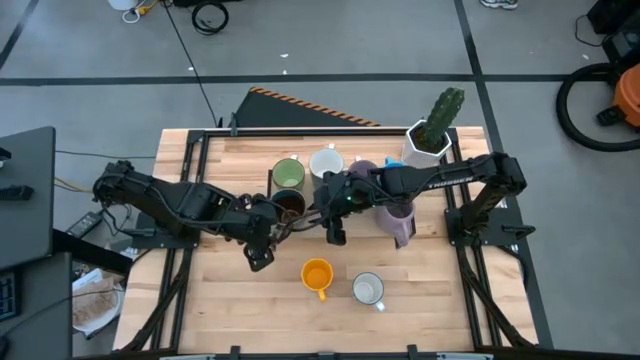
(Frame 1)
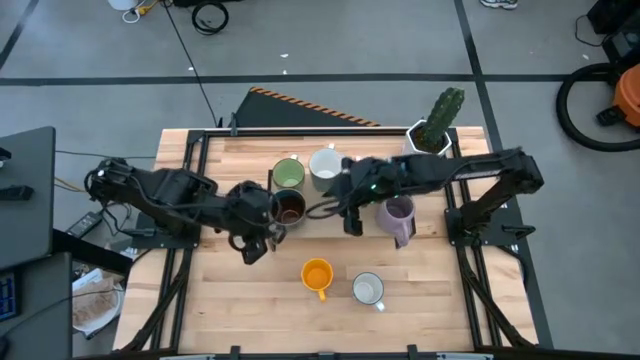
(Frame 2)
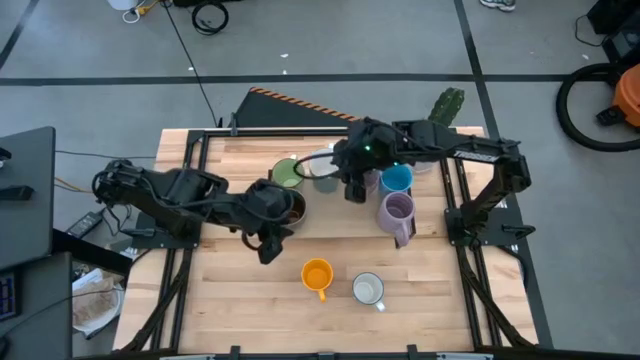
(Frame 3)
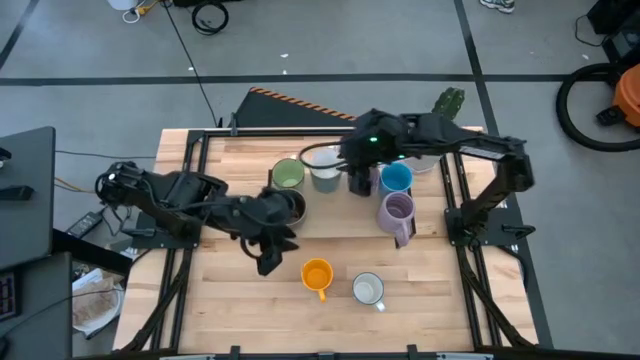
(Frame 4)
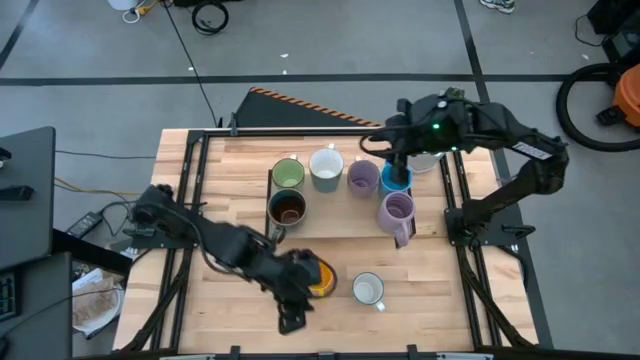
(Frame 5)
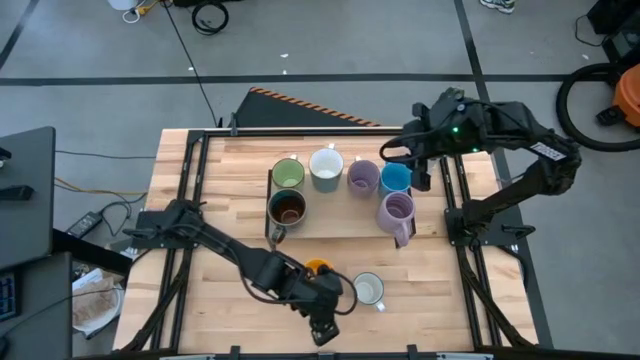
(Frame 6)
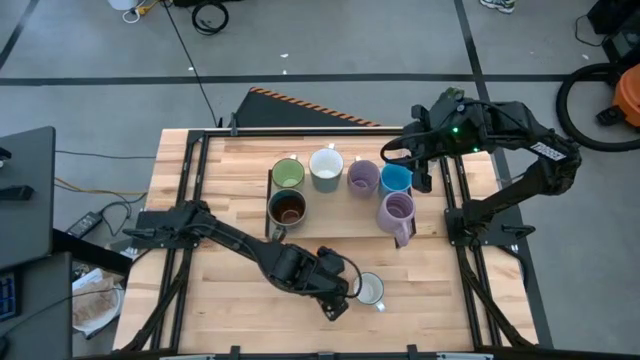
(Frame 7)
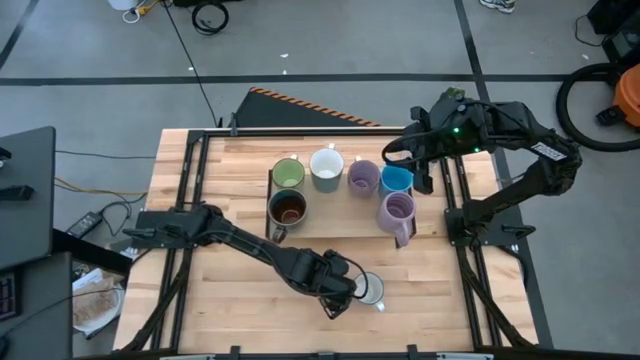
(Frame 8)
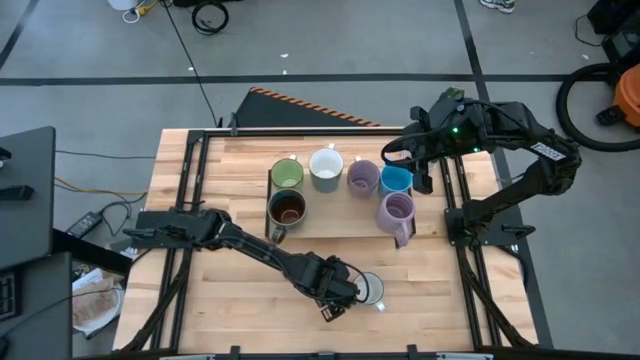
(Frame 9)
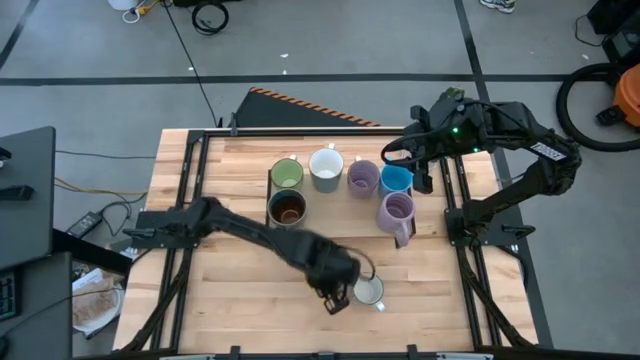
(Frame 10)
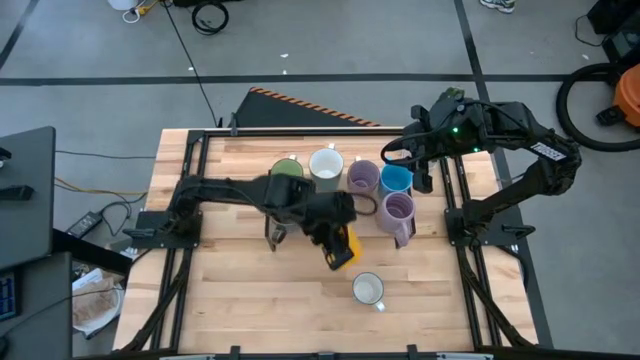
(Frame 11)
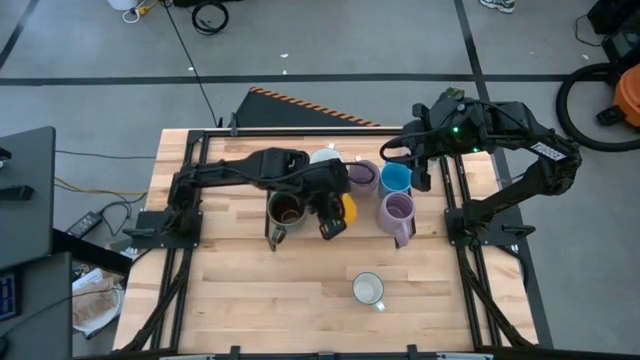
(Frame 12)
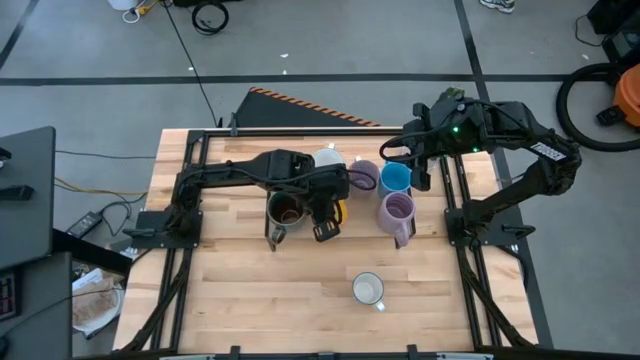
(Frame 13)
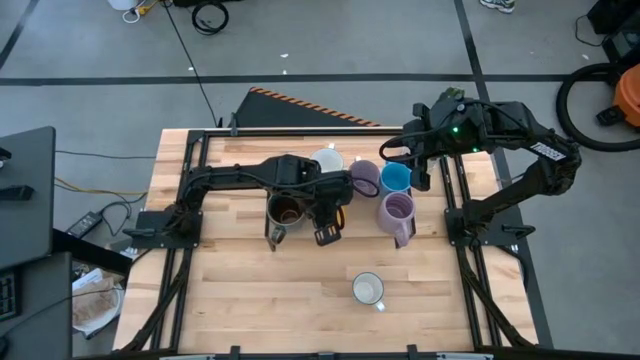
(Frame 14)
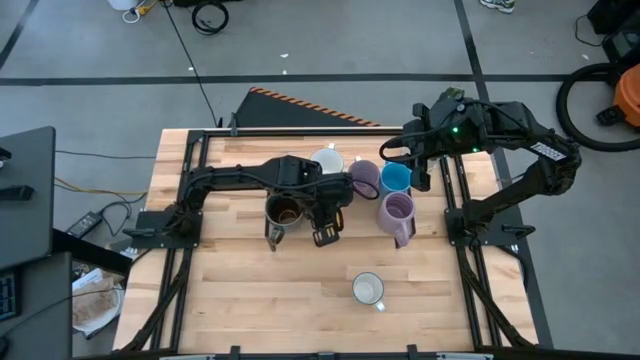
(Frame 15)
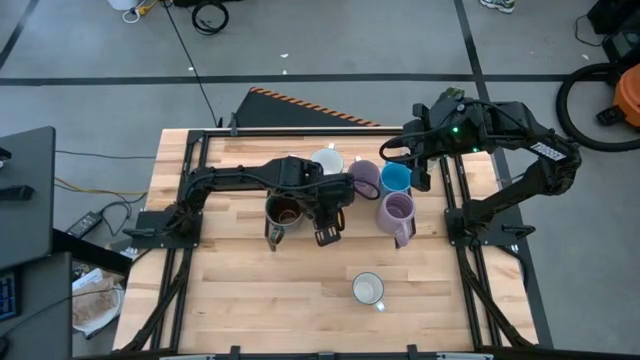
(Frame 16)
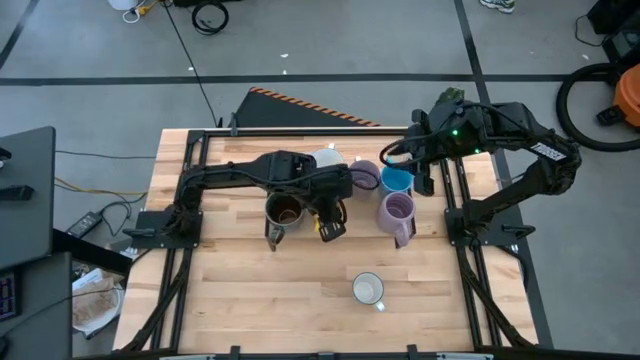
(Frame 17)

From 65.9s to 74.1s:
Task: Place coffee mugs
Put the yellow mug on the shelf

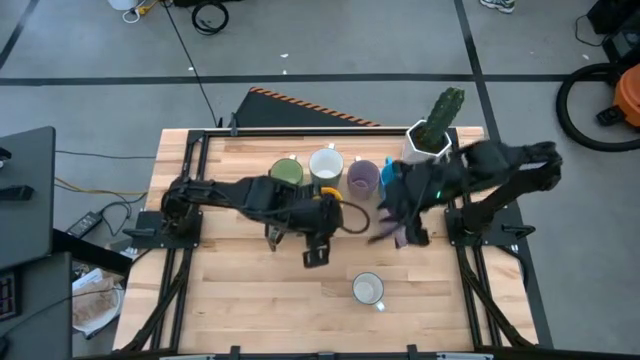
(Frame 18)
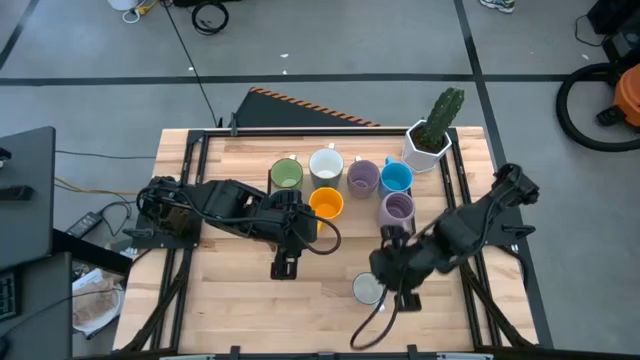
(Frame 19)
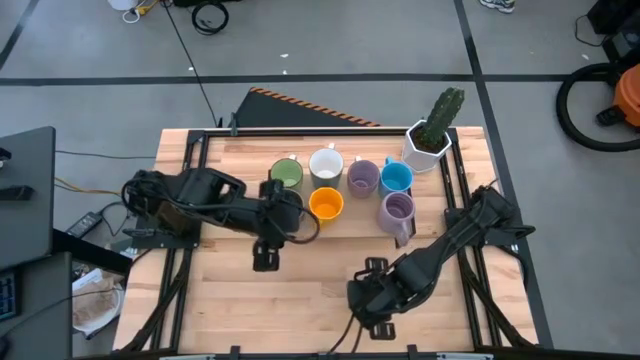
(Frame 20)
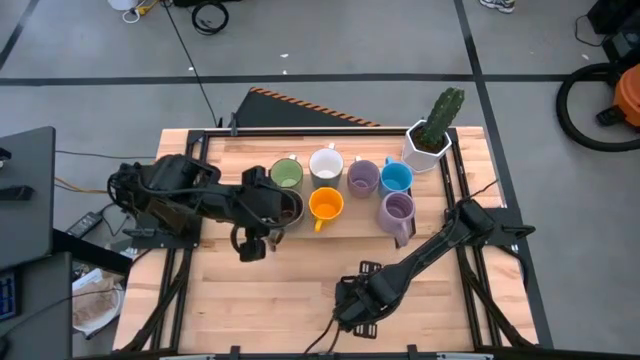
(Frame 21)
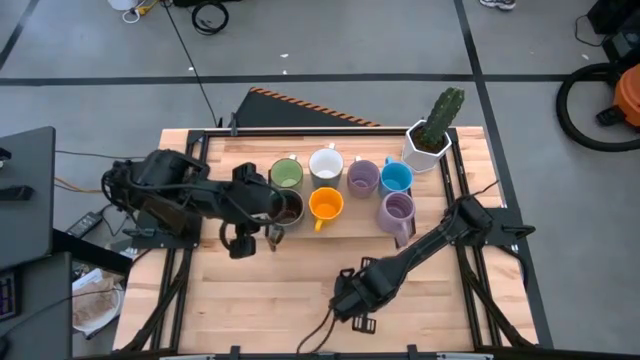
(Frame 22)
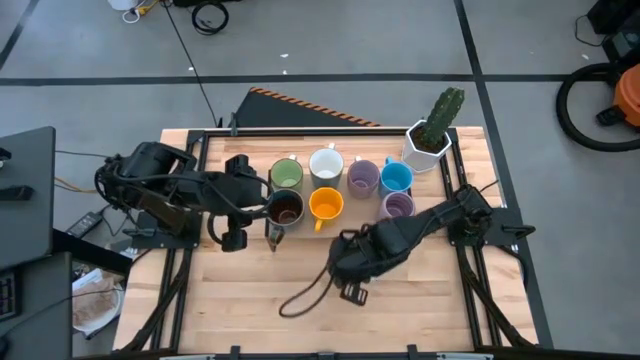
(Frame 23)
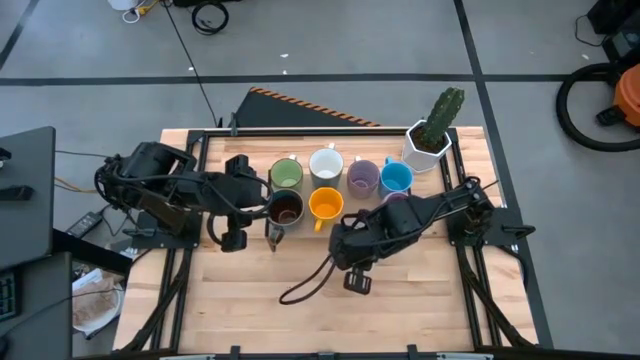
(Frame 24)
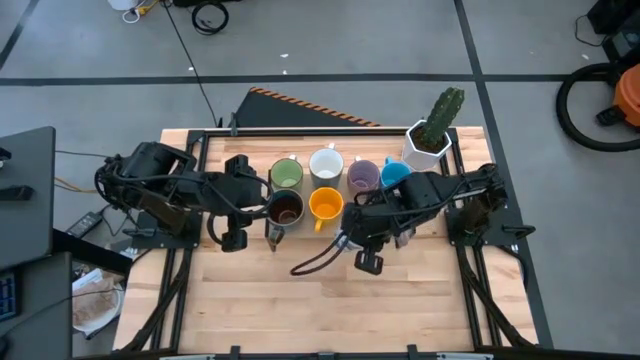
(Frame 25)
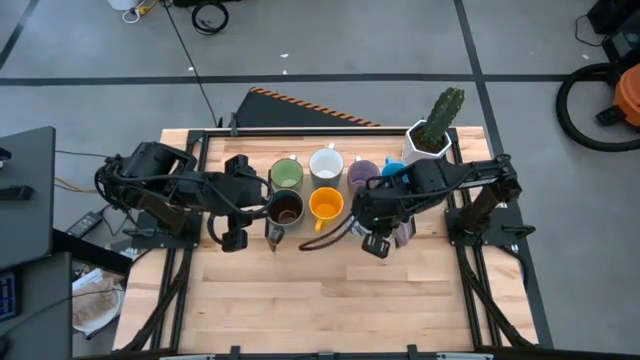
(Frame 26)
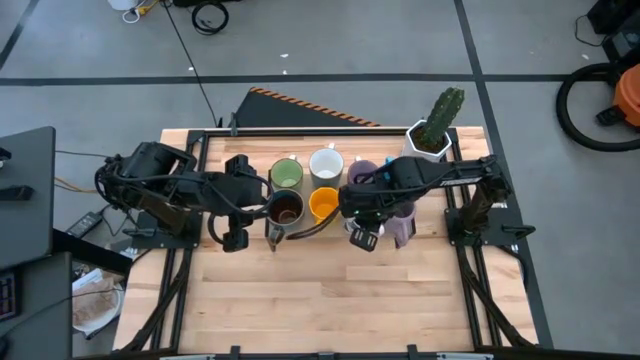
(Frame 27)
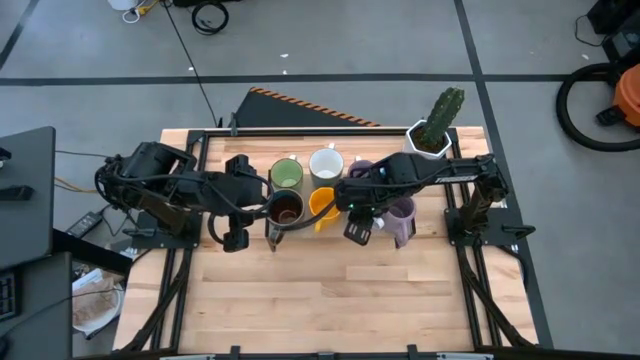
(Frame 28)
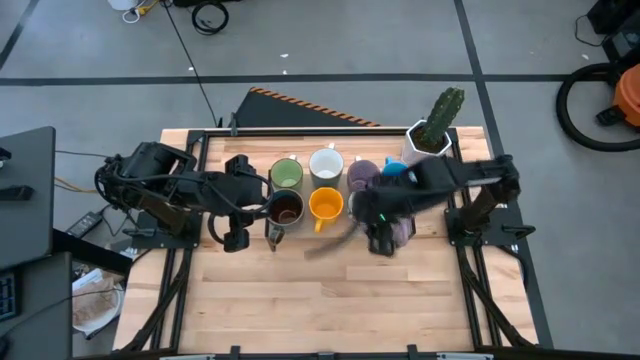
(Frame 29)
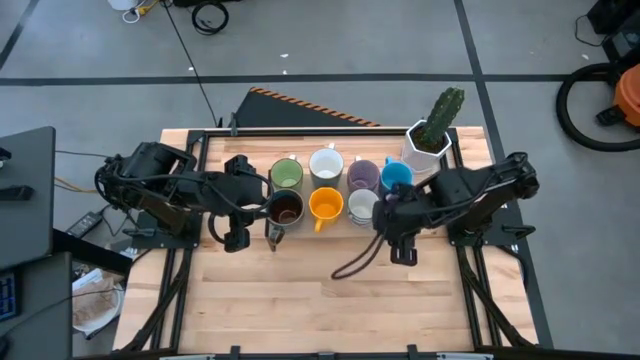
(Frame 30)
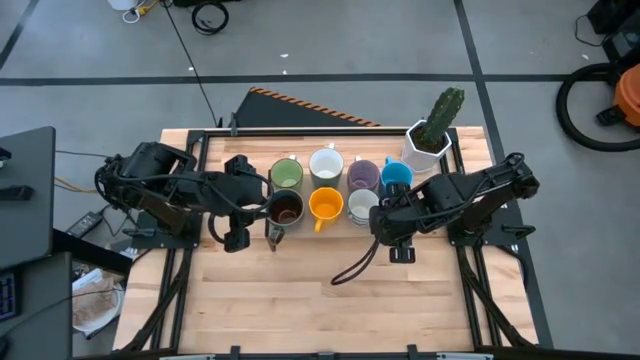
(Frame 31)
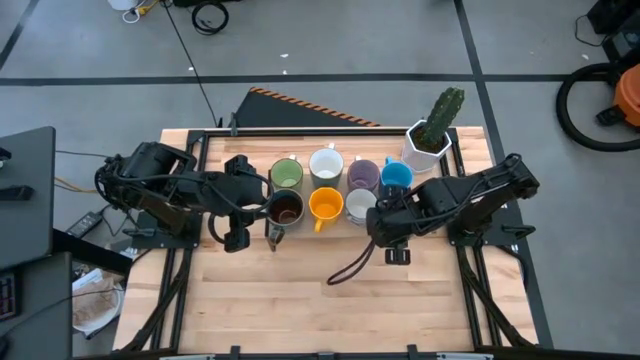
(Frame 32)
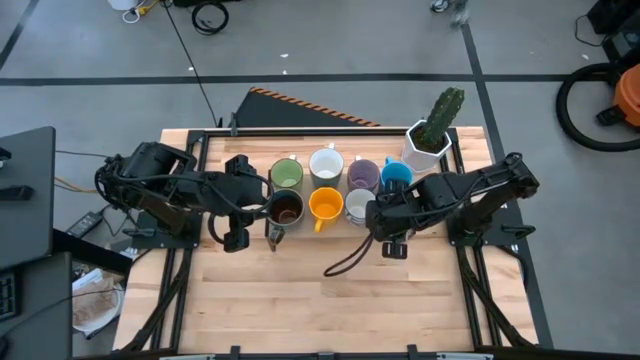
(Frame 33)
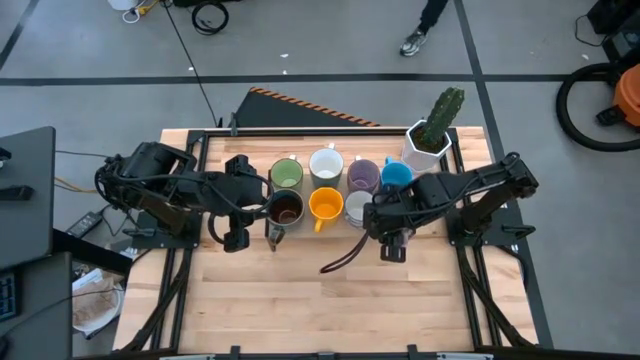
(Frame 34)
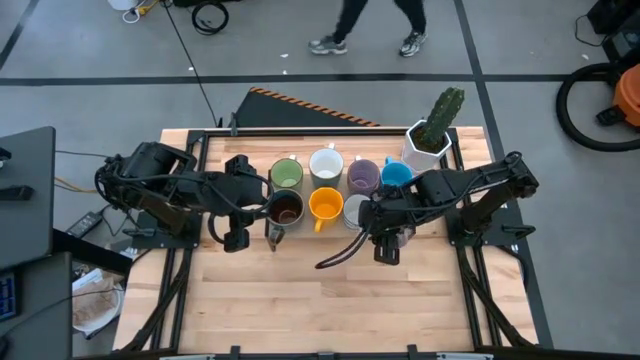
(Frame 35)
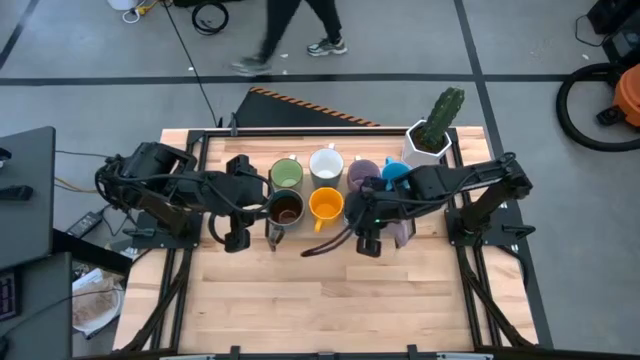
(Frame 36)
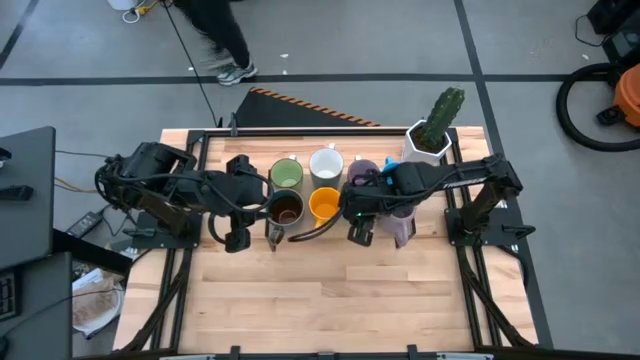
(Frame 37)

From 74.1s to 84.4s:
Put the white blue mug on the shelf

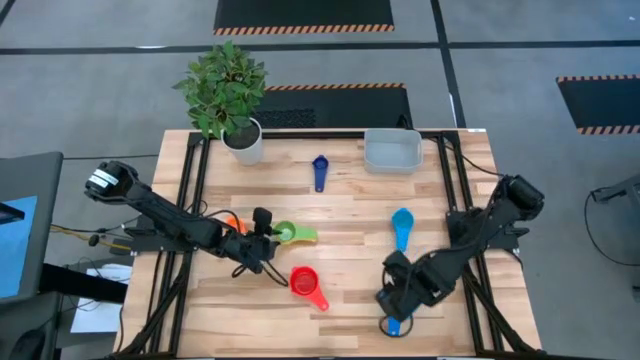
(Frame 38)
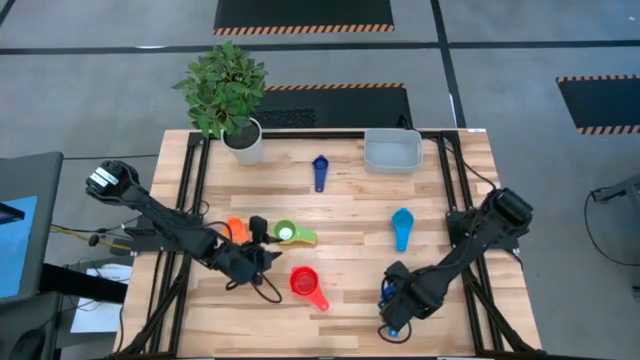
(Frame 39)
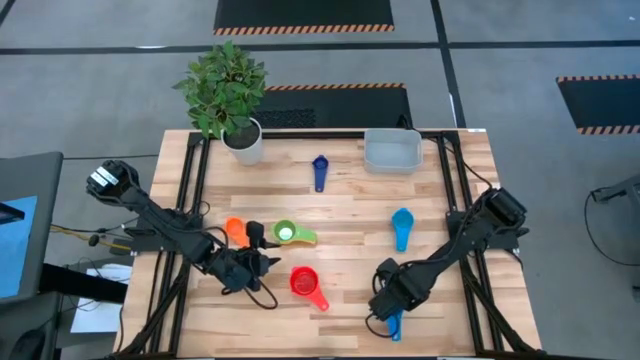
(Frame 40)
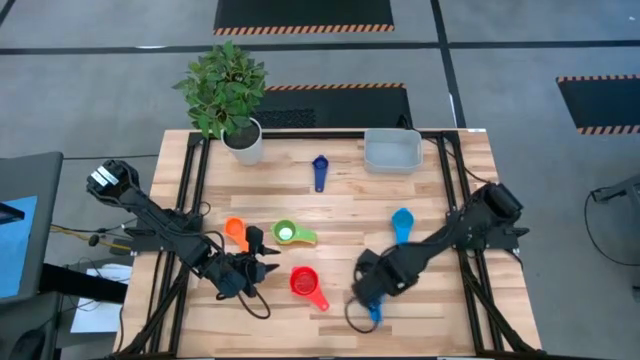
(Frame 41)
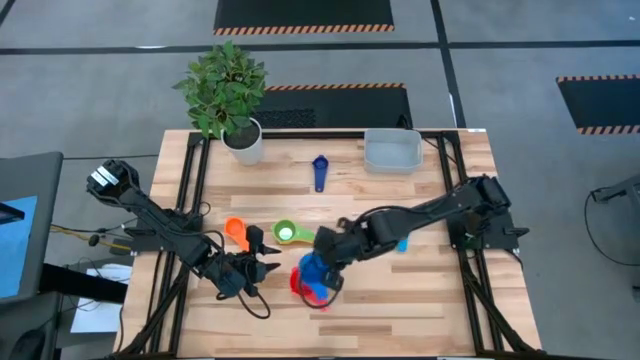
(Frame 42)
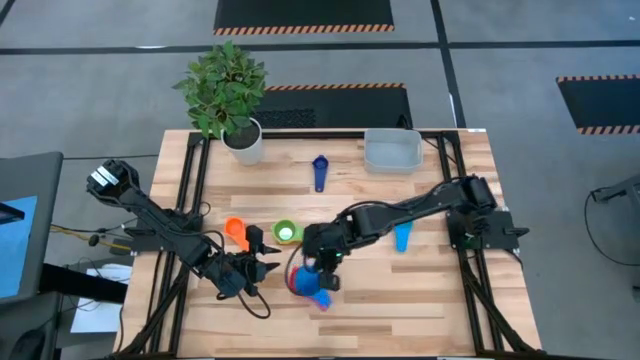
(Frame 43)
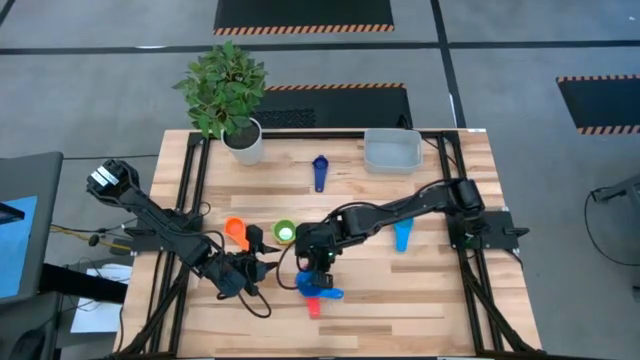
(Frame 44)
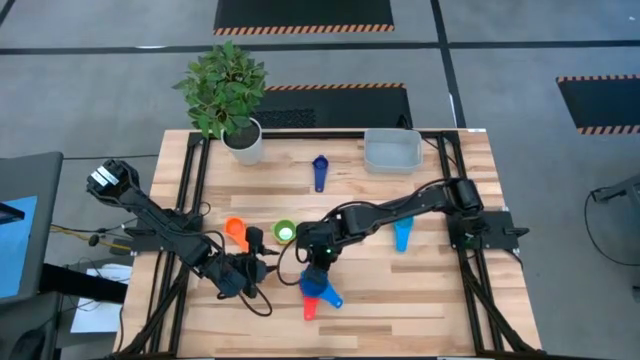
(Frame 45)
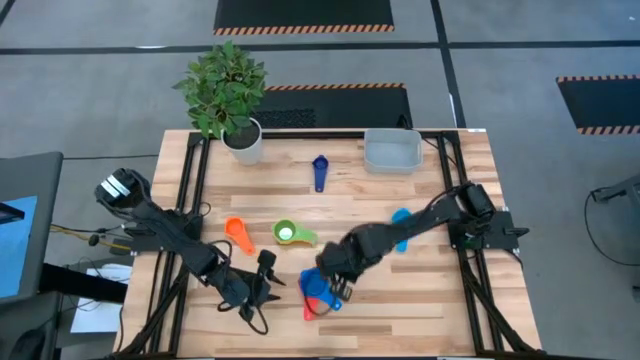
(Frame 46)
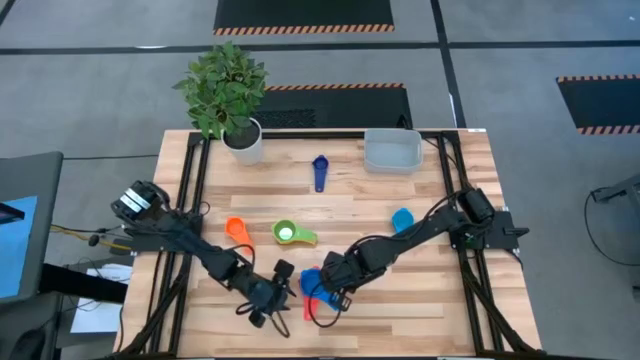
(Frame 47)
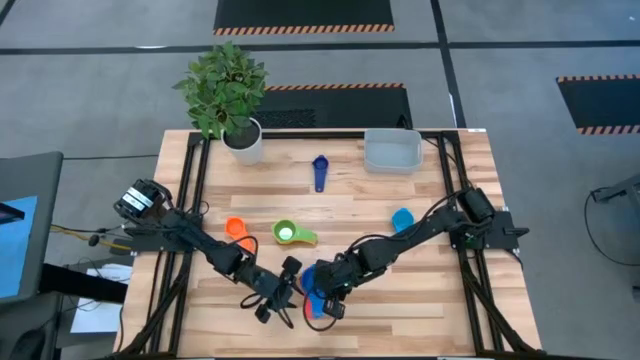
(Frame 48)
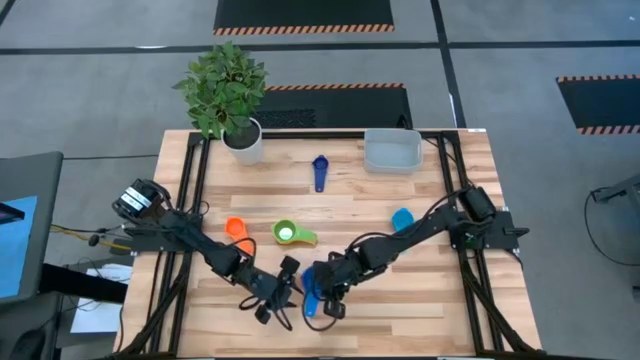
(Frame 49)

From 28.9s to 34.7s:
Task: Nest measuring cups in basket
Stack the blue measuring cup on top of the red measuring cup
